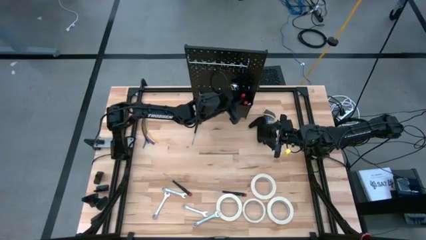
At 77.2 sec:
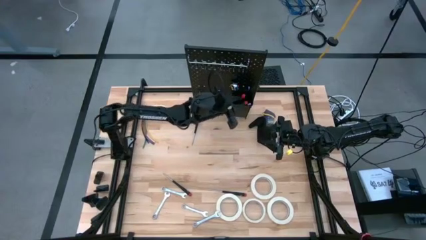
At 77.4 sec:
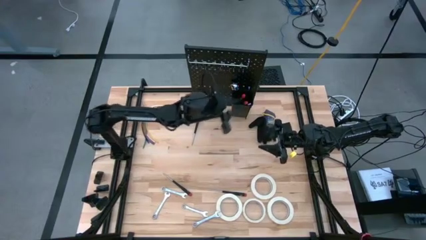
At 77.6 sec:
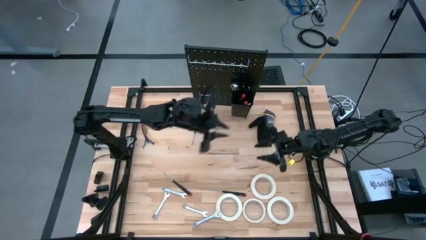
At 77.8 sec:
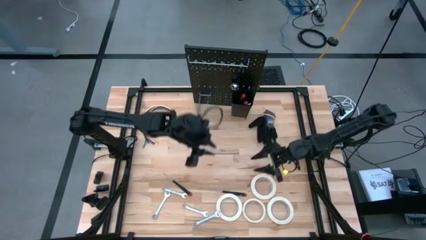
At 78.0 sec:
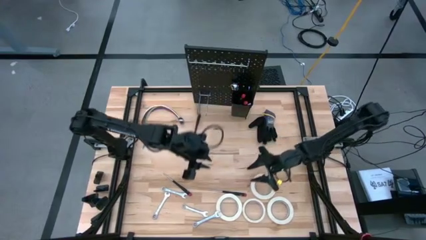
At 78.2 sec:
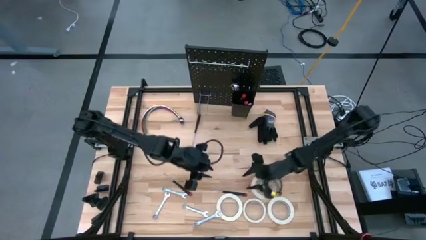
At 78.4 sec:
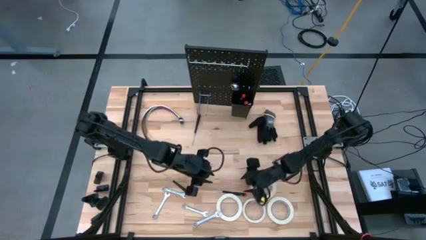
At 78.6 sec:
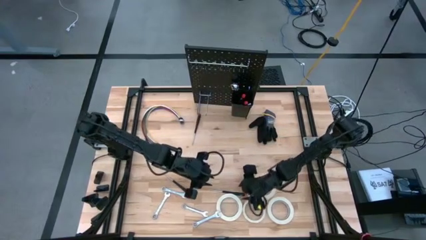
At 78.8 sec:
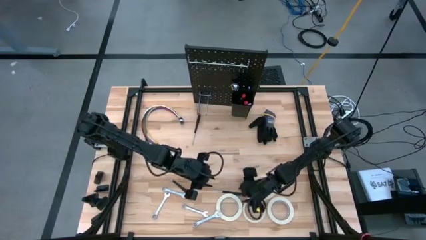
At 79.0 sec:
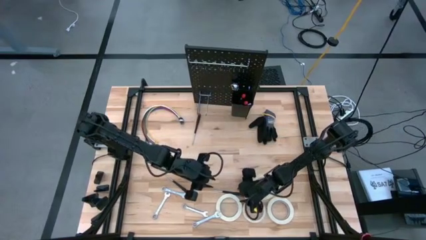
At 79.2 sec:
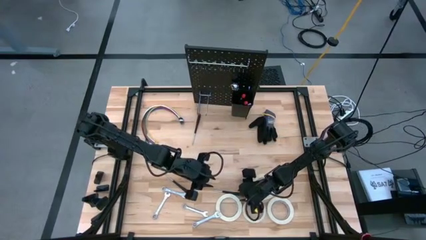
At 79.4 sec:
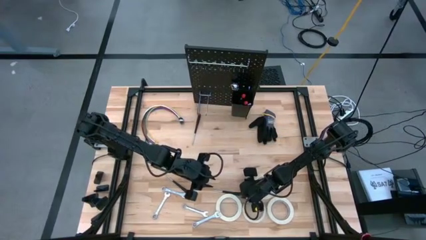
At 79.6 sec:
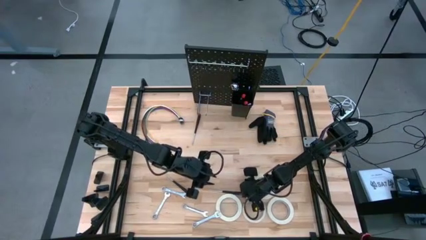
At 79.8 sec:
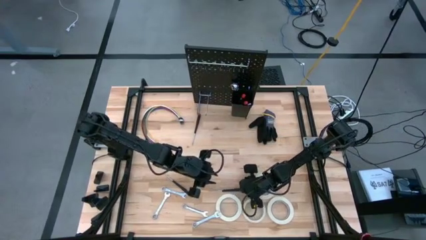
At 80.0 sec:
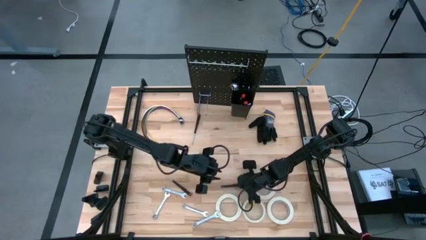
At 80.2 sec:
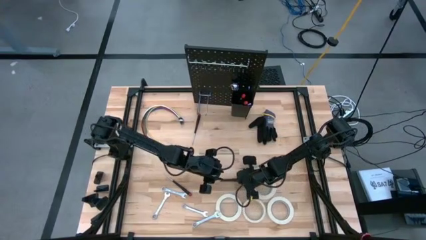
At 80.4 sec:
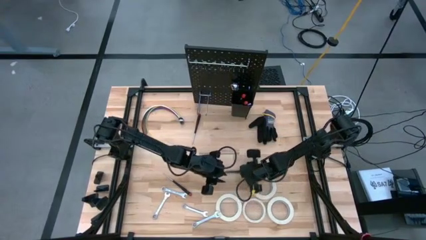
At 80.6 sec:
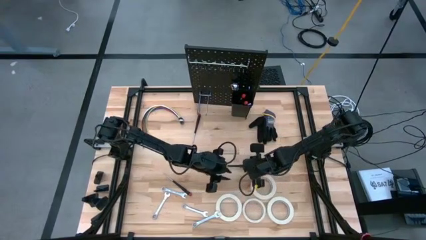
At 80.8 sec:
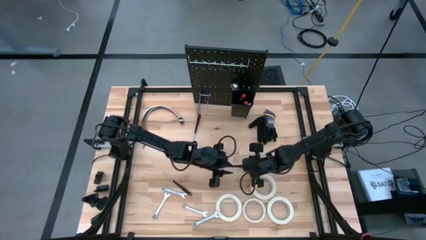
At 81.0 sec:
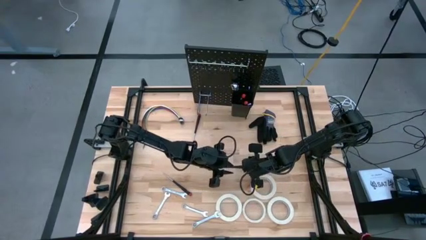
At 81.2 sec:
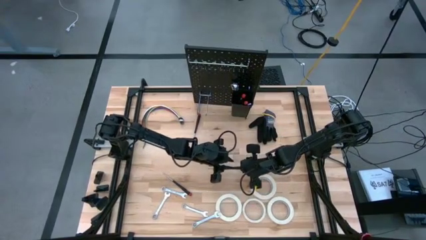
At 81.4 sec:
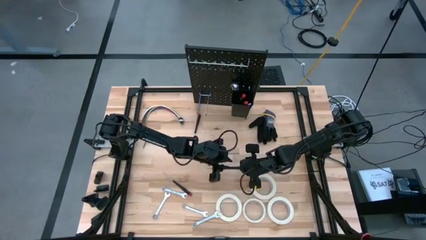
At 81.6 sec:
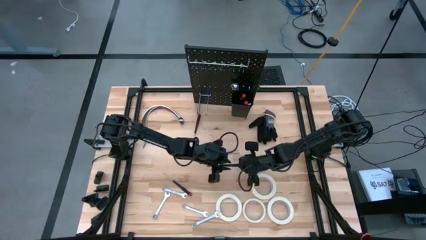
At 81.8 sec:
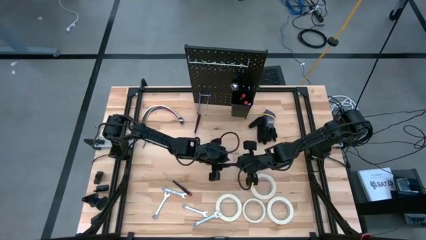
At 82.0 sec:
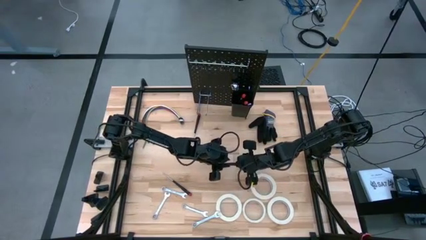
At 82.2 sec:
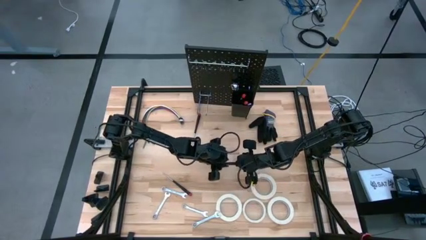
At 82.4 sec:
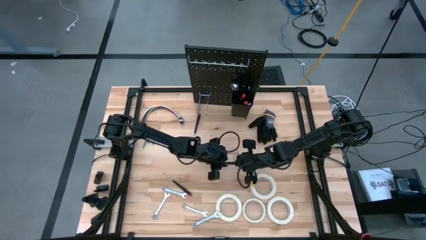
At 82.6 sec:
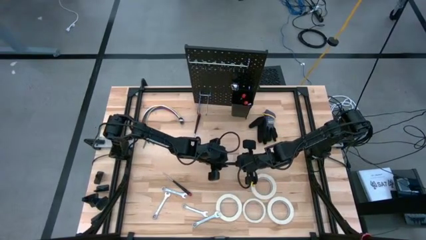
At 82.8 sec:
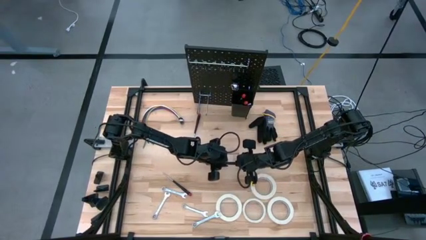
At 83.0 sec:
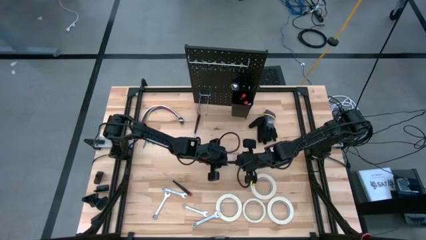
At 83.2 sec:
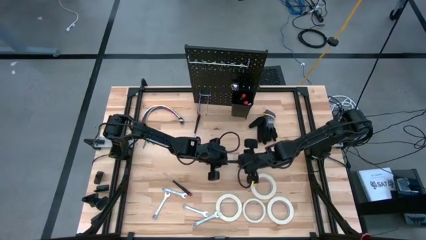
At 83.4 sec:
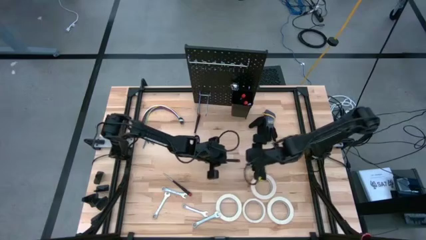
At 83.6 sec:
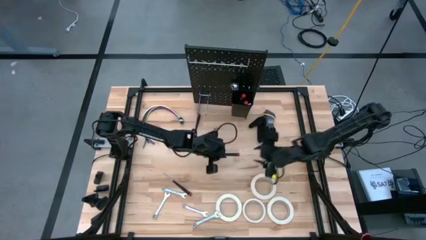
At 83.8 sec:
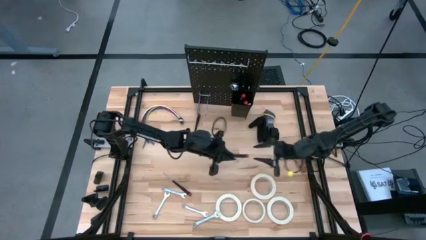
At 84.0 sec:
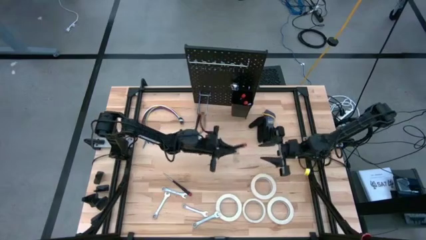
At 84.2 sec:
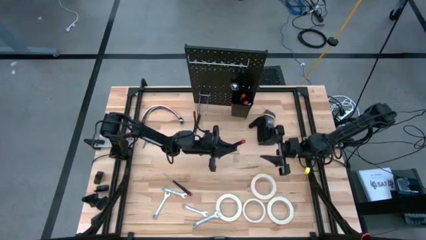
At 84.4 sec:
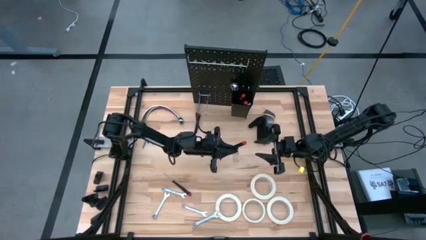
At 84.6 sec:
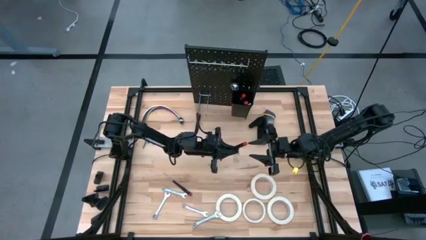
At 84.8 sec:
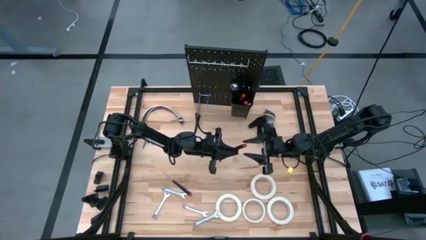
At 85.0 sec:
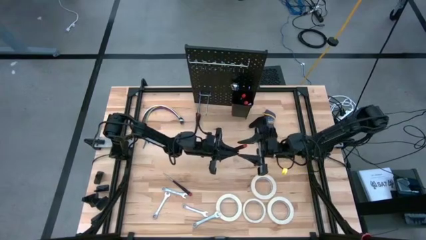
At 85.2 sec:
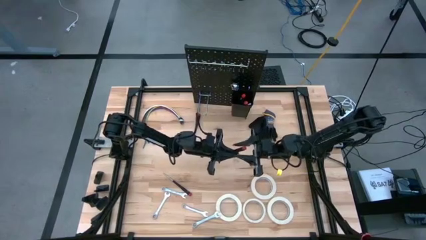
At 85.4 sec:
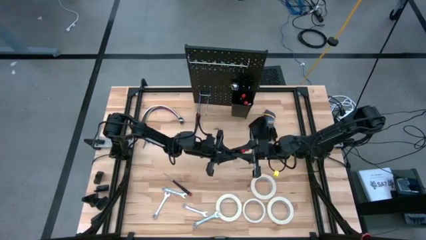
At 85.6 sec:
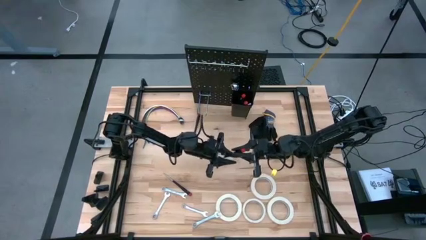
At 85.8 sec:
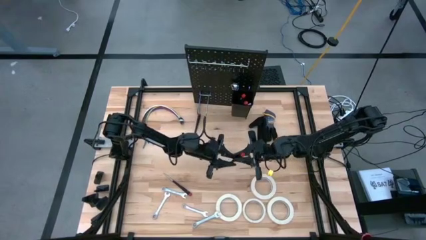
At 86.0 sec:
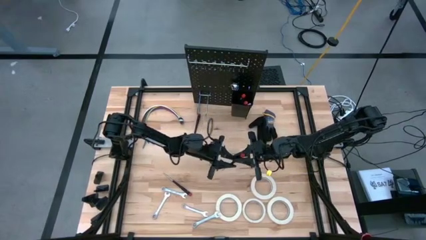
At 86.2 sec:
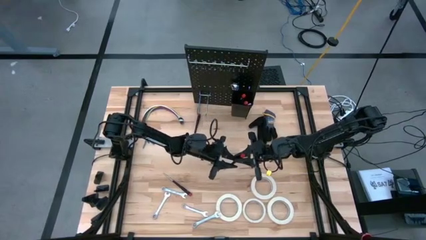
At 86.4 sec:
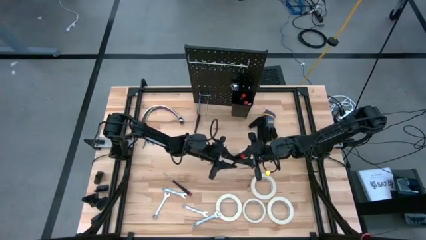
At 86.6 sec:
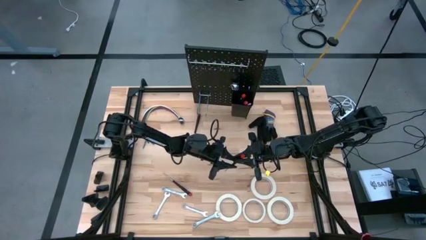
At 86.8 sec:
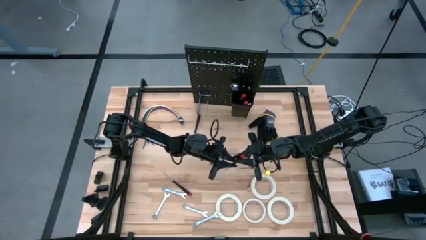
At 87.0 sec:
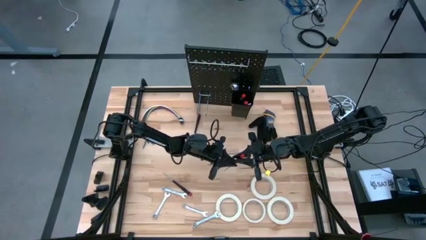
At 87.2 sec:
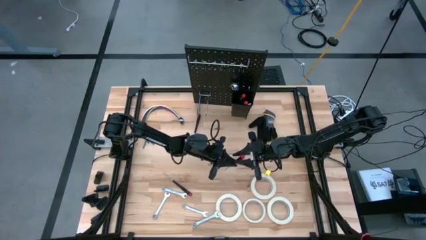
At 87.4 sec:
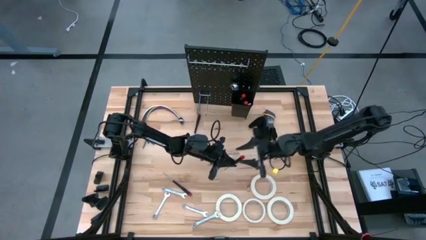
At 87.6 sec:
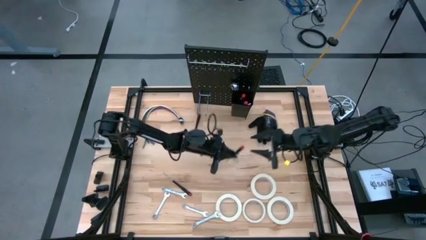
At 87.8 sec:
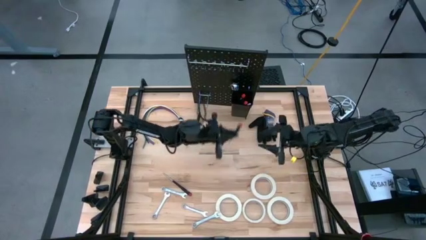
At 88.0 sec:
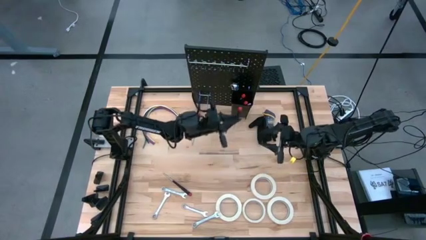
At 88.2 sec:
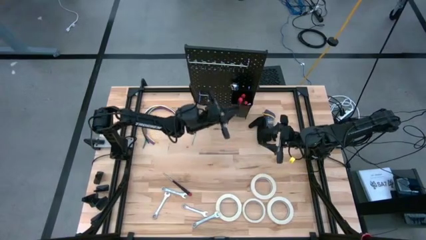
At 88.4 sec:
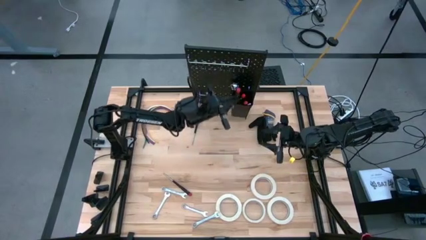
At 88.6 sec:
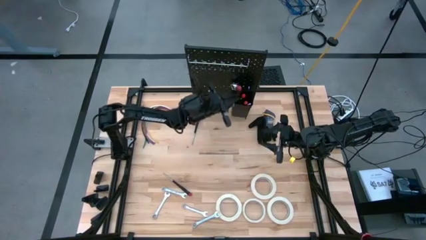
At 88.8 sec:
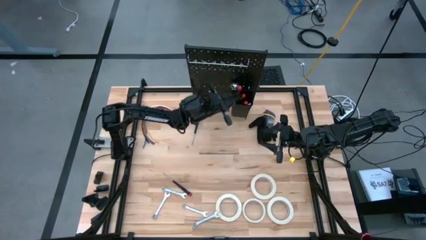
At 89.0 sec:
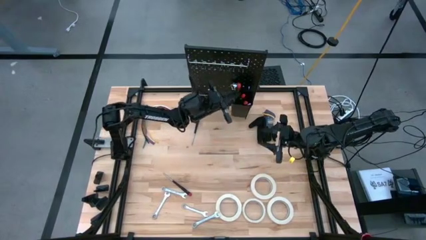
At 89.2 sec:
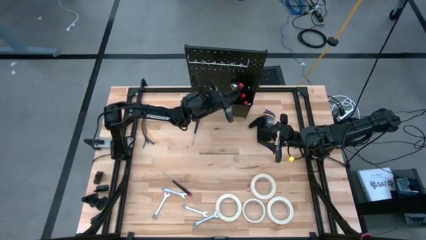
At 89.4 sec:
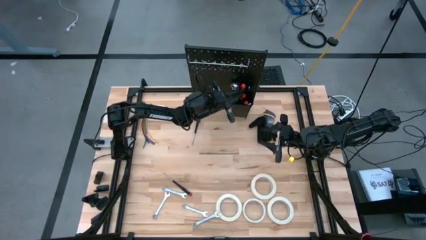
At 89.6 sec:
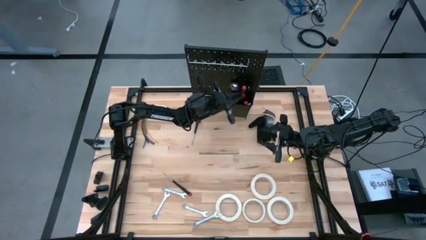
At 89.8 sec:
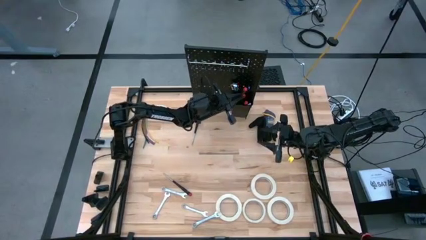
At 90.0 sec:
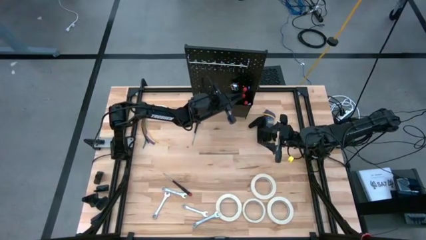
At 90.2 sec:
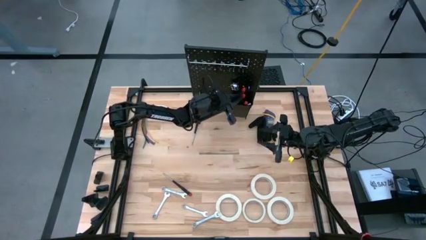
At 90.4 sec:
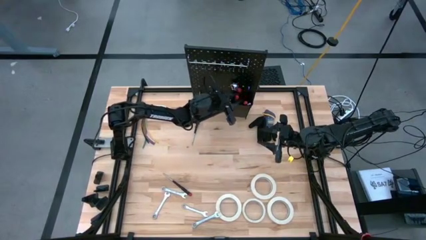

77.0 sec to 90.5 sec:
Task: Hang tools onto peg board
Put the black nut driver into the black bin on the peg board

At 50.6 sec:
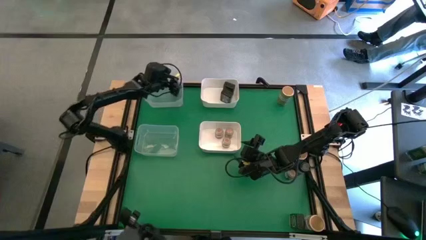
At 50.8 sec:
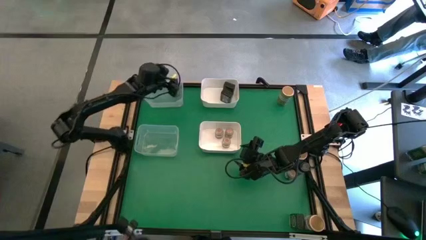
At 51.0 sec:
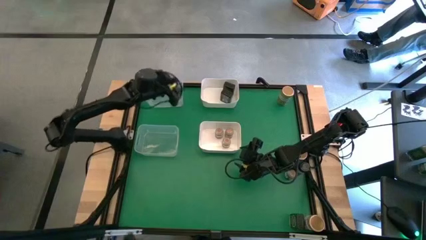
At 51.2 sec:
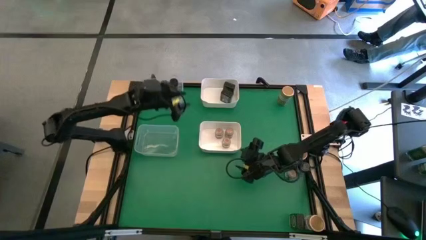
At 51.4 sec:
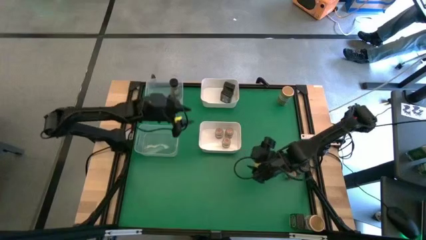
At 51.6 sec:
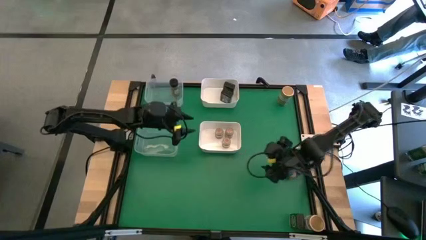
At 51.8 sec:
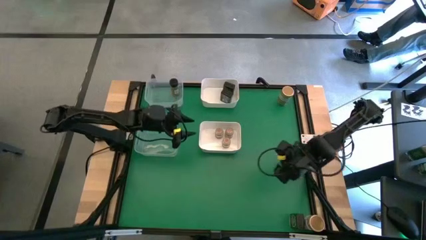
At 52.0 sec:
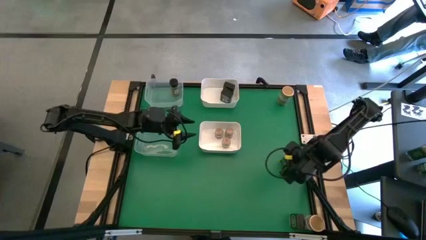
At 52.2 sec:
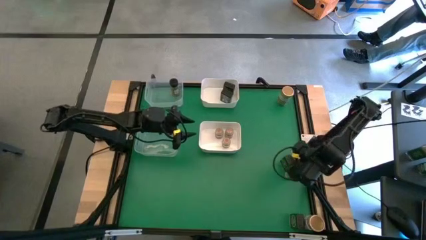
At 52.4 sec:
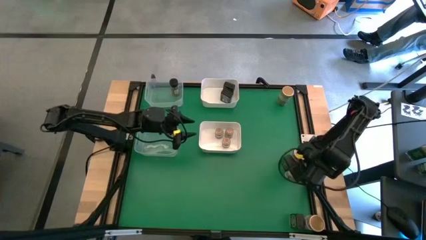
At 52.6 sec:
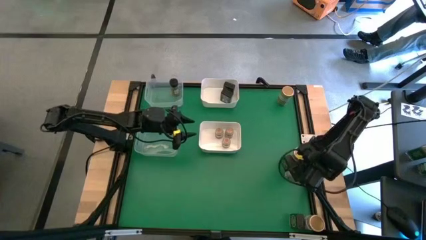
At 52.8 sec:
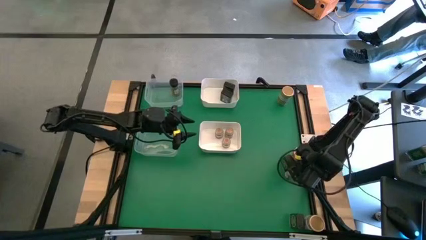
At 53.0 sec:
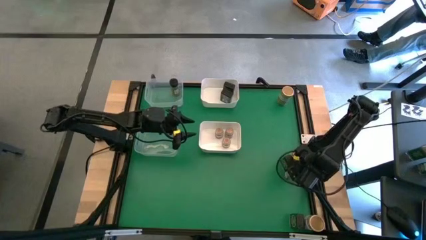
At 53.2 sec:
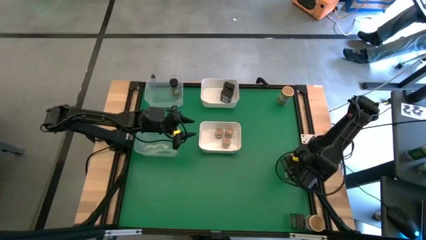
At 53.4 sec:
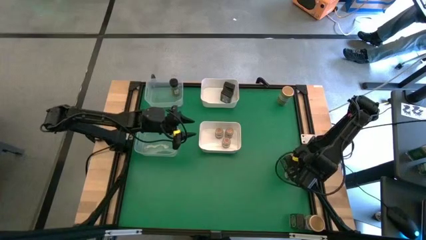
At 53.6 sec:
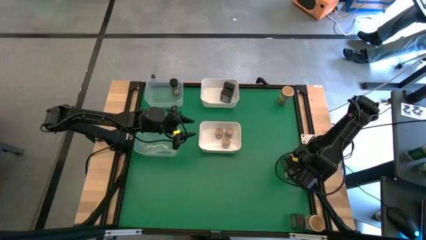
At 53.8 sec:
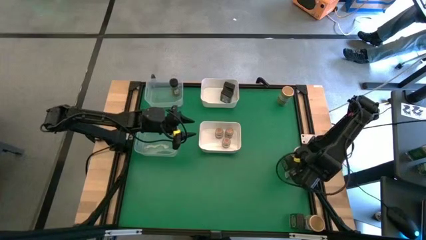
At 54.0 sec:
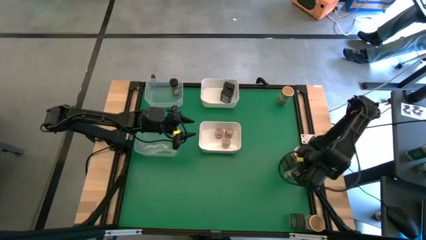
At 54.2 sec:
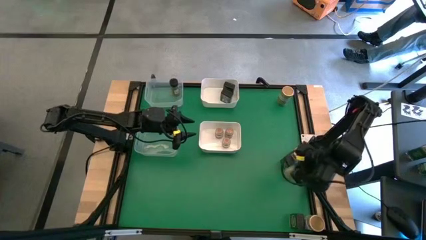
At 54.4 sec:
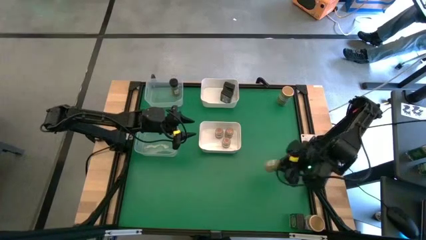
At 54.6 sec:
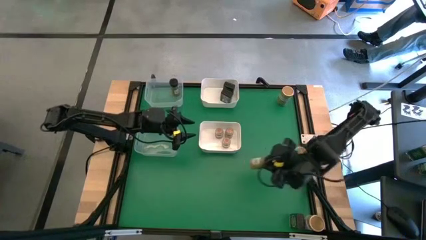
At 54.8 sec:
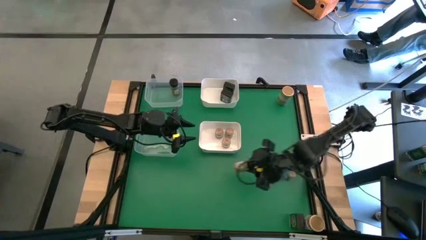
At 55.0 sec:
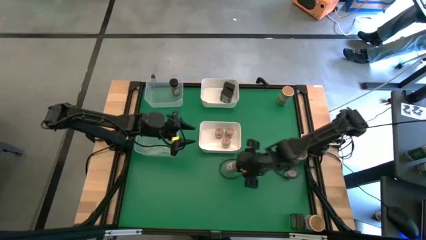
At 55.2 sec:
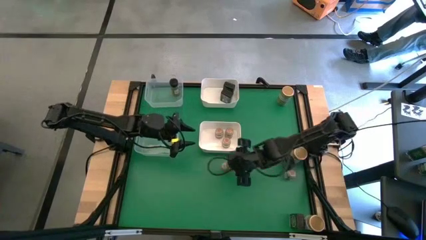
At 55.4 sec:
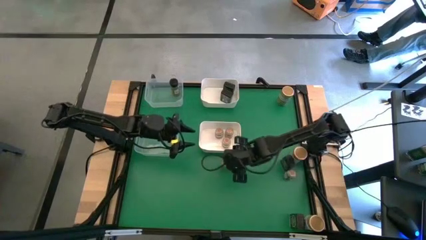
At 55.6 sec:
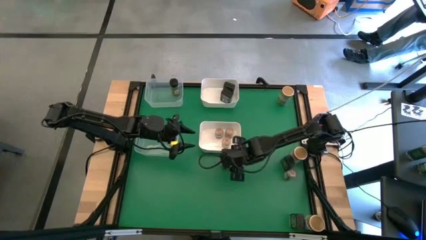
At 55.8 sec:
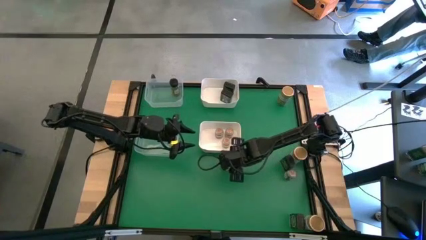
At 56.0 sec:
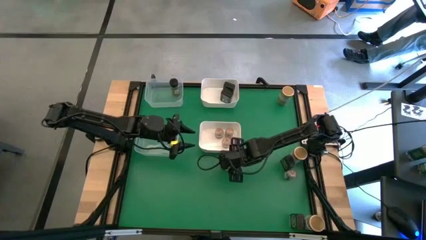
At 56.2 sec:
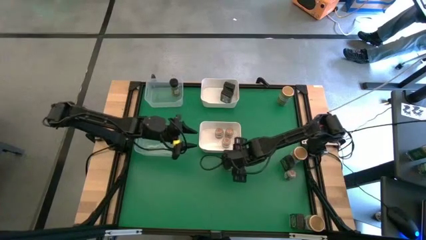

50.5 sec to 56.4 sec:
Task: Sort spices by type
Move the green seasoning bottle to the center of the table
